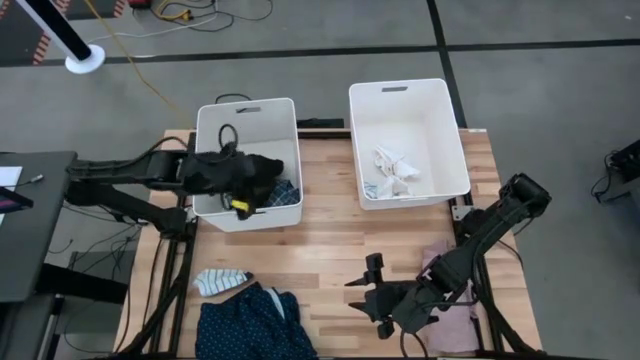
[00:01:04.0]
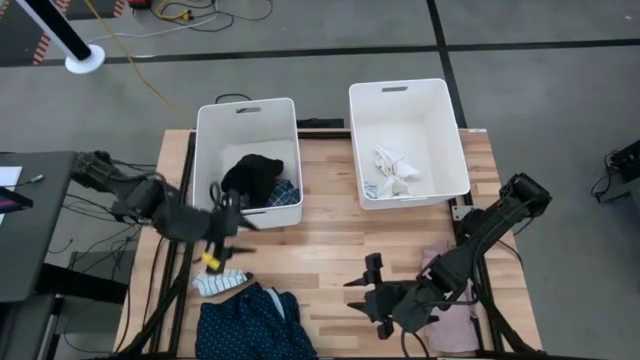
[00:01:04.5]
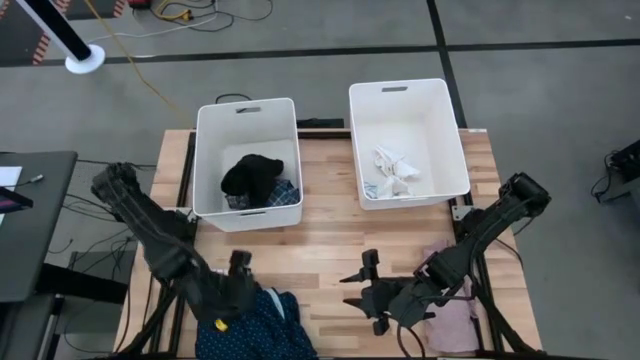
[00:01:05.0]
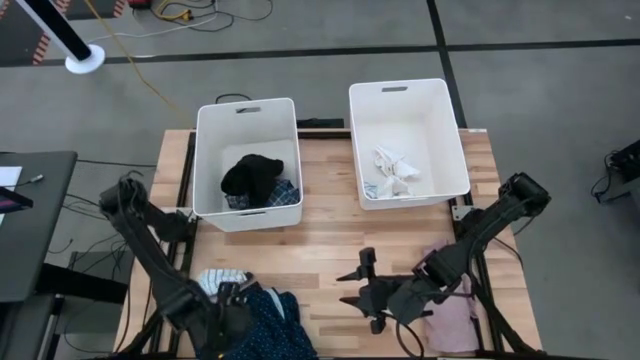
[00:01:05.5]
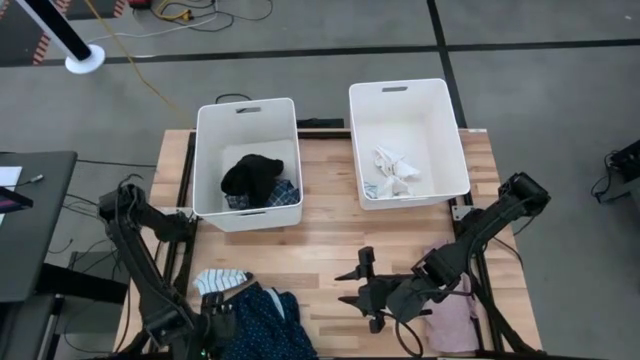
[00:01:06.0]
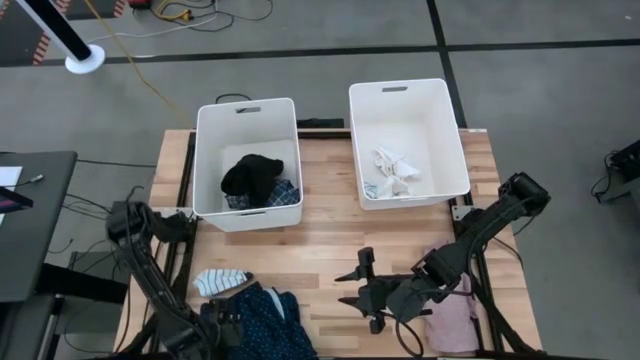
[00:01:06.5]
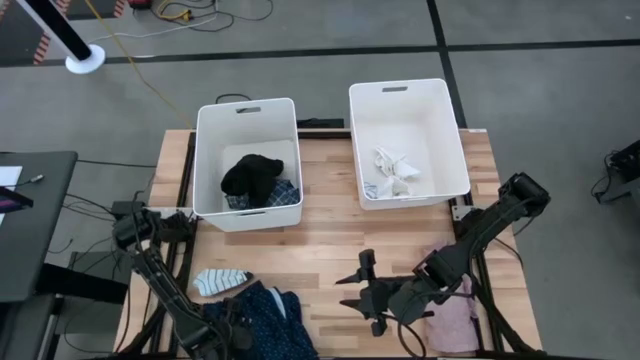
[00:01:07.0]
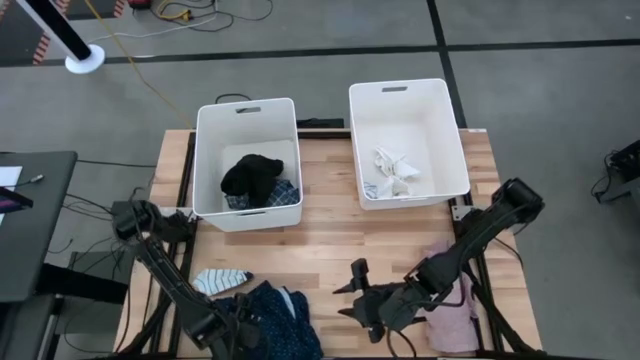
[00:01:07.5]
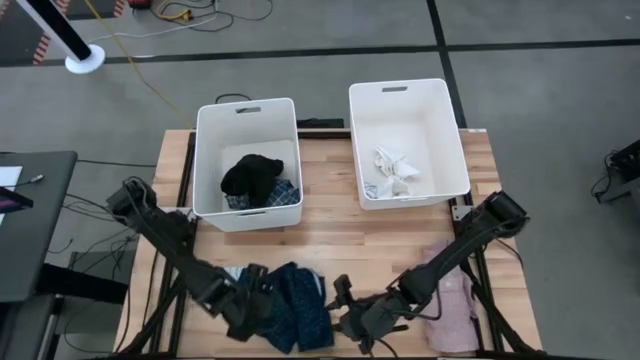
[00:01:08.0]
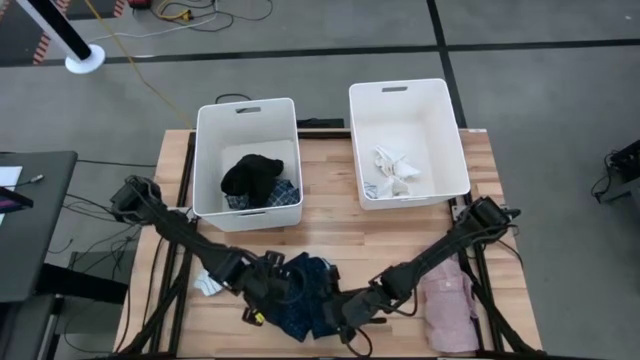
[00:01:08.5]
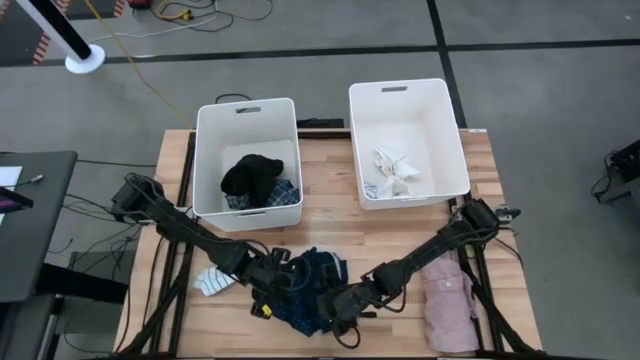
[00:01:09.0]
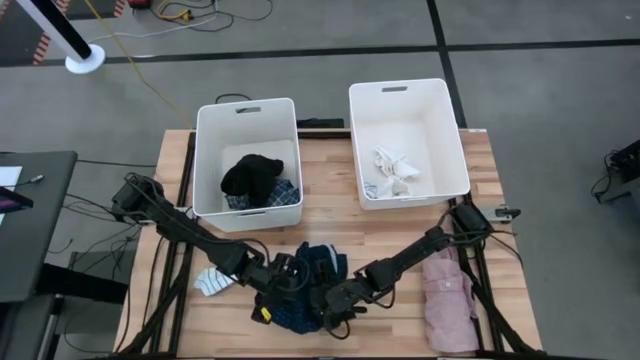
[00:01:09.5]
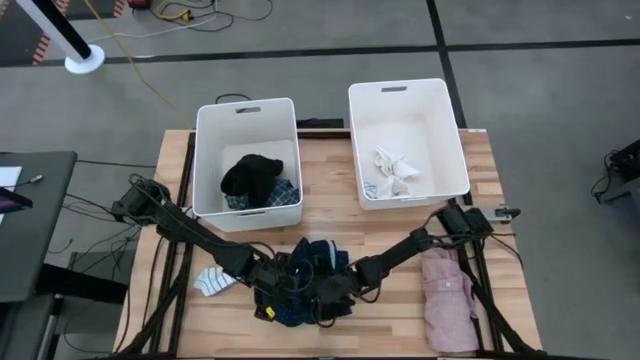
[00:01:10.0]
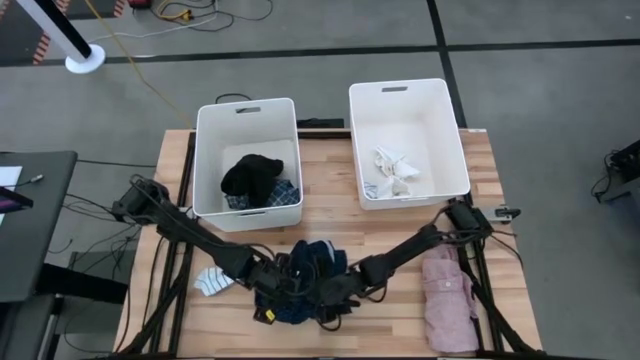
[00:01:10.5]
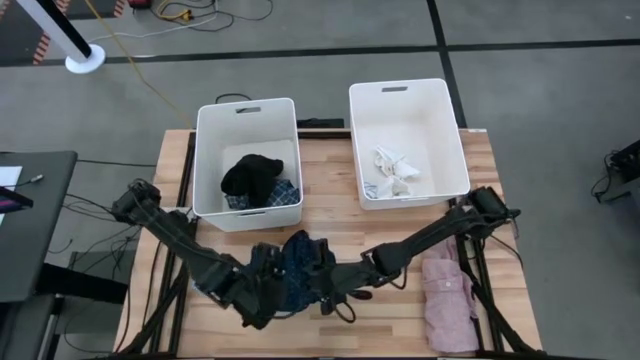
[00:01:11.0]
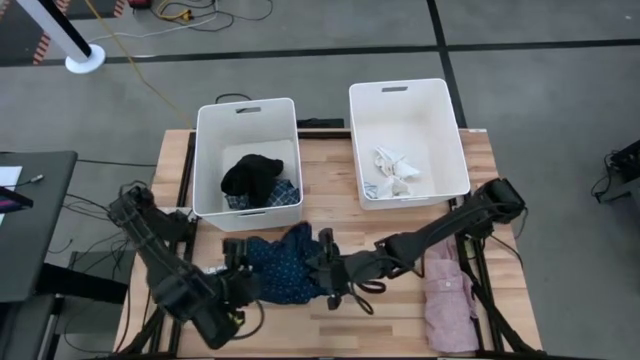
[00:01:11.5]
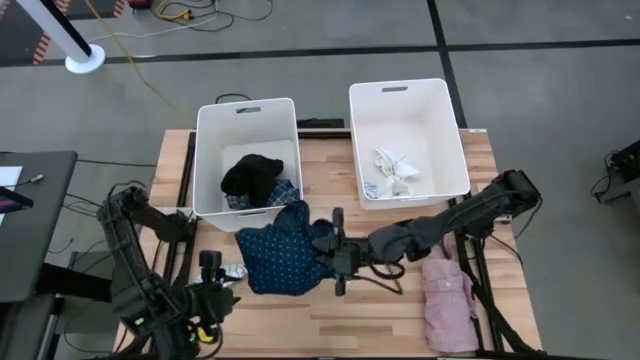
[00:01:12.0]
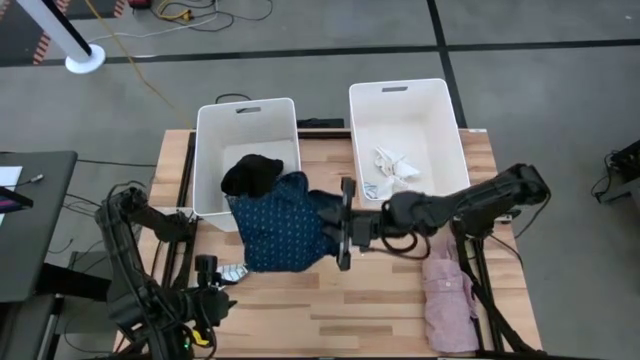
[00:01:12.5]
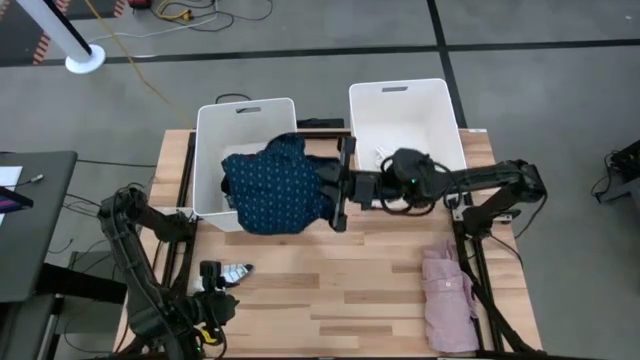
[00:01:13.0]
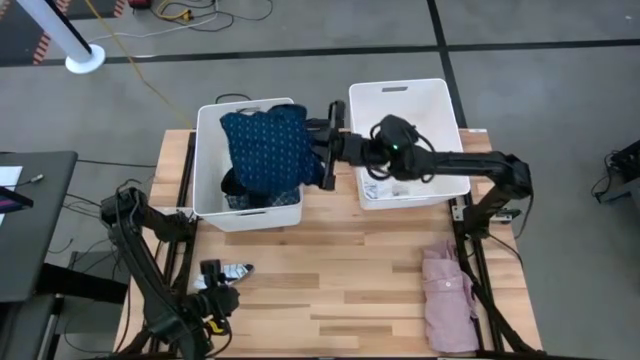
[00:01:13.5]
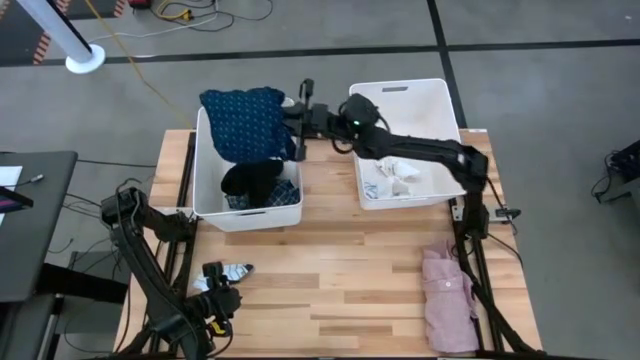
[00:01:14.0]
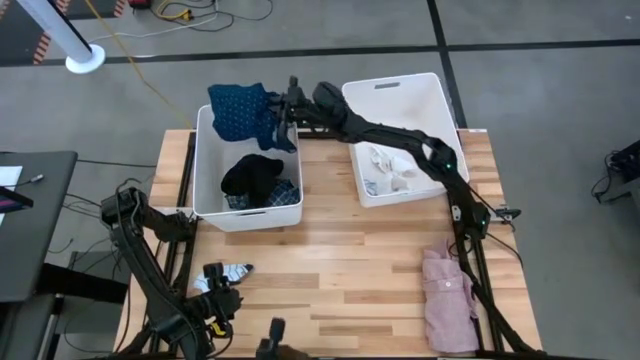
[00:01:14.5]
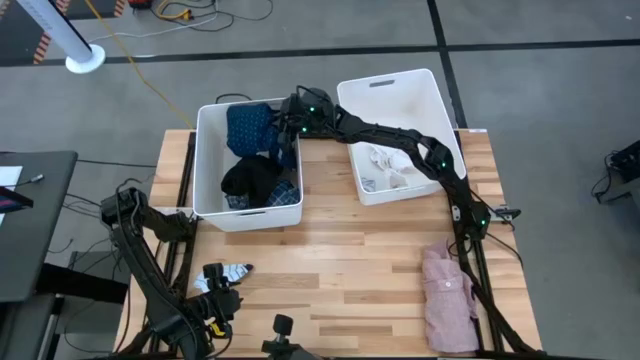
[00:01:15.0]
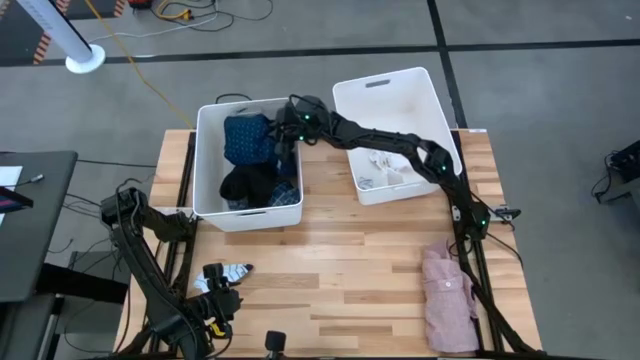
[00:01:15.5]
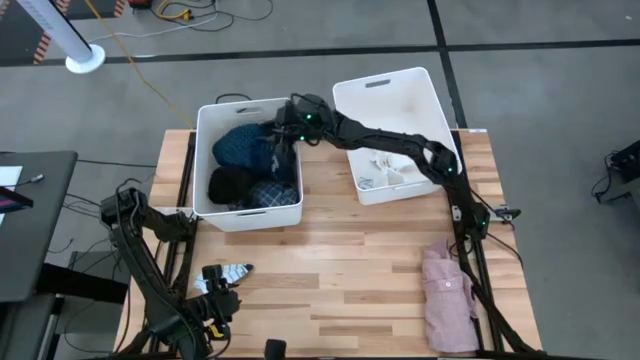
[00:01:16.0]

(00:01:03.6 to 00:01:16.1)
Task: Sort clothes
Put the blue clothes into the left bin

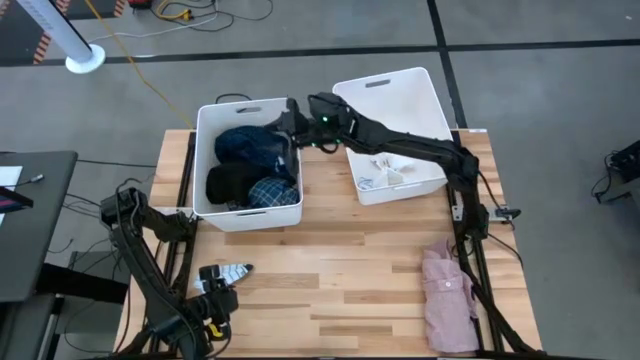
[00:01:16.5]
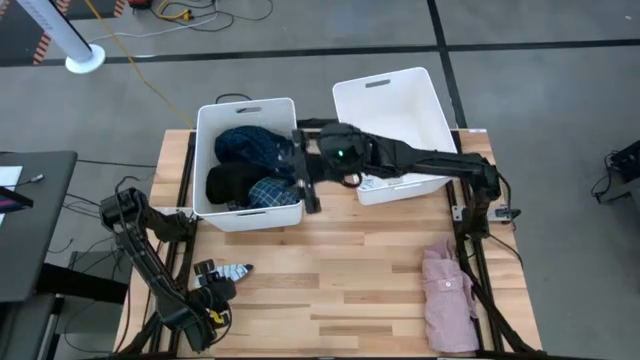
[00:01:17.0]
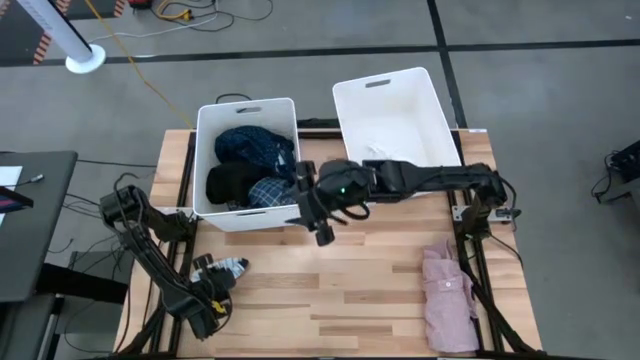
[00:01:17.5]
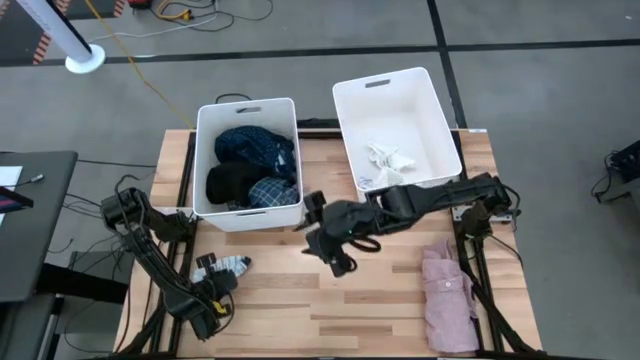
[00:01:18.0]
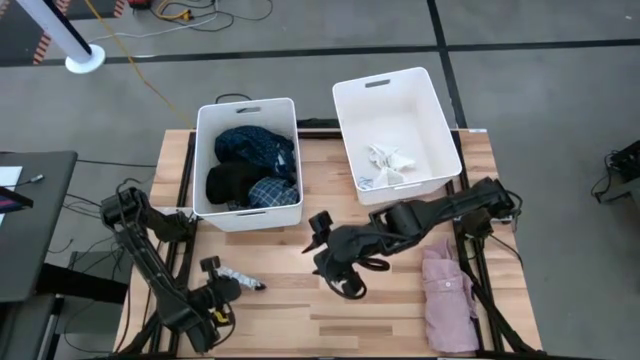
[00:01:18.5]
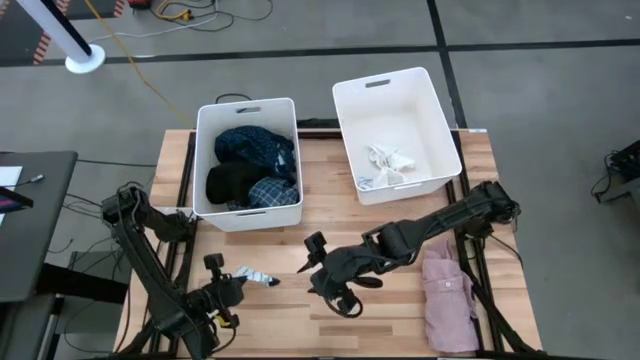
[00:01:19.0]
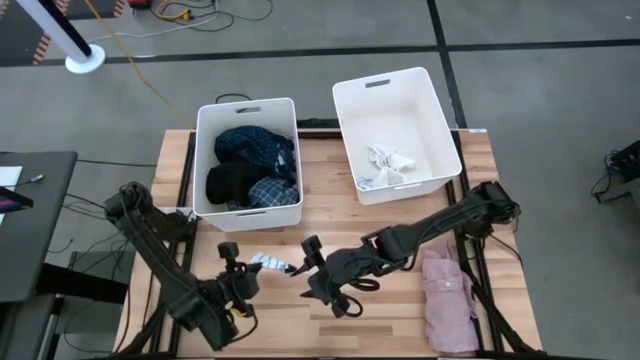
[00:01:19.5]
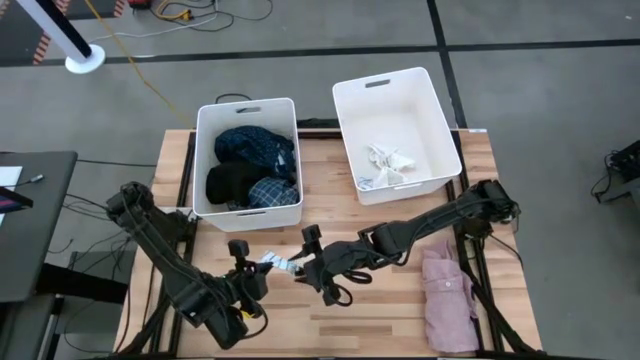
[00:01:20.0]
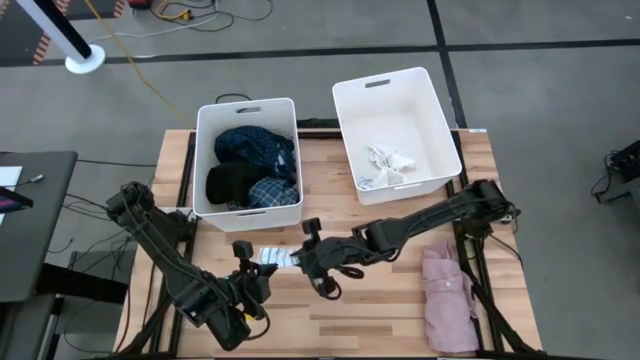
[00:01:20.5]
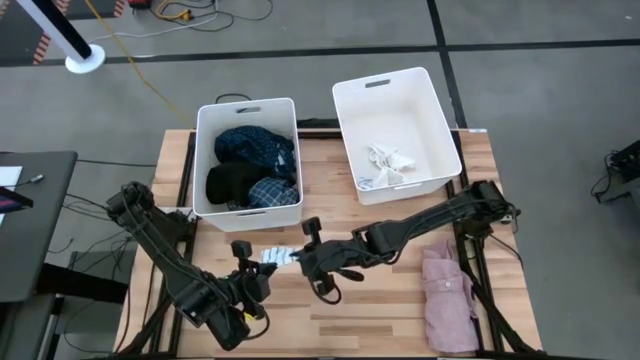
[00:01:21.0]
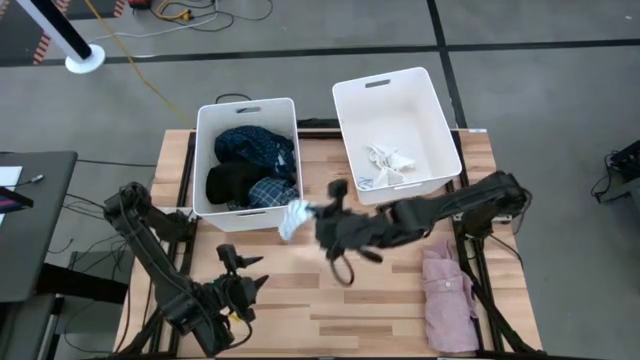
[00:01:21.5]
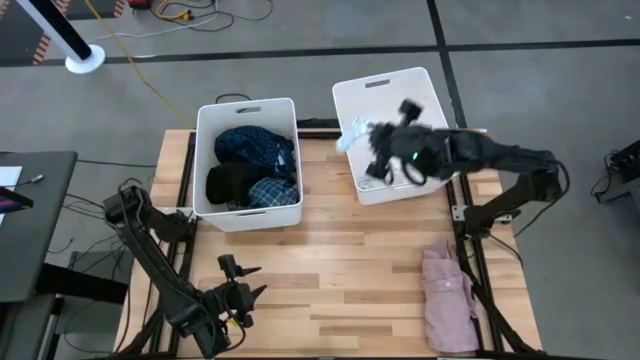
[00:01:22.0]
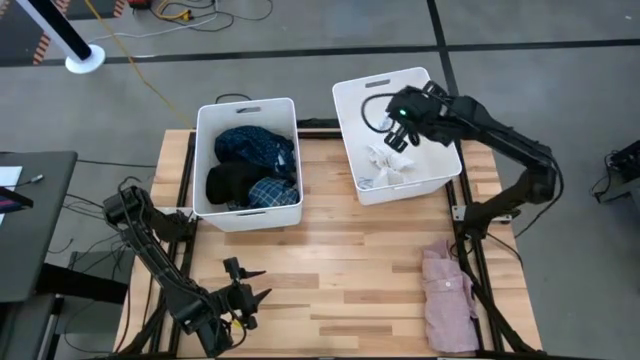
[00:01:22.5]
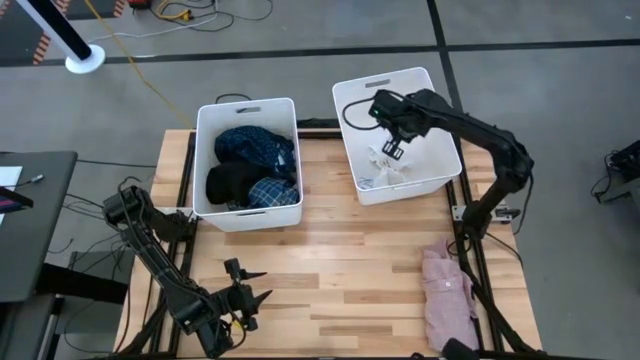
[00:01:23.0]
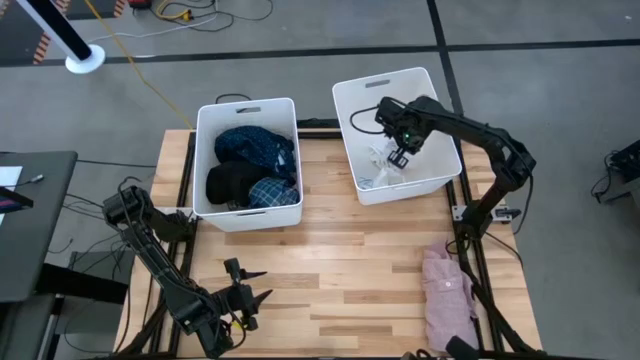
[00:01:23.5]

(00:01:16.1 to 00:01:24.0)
Put the striped sock into the right bin
